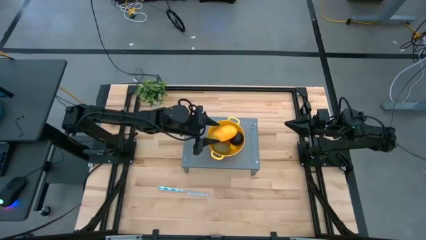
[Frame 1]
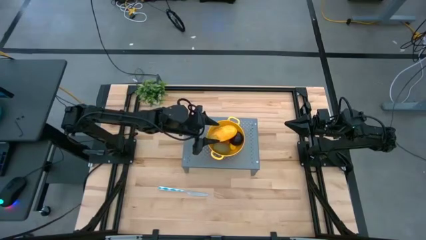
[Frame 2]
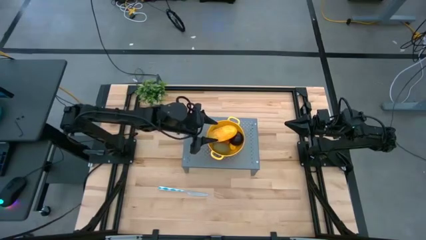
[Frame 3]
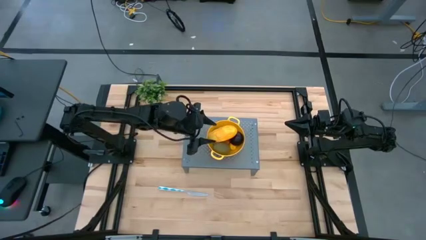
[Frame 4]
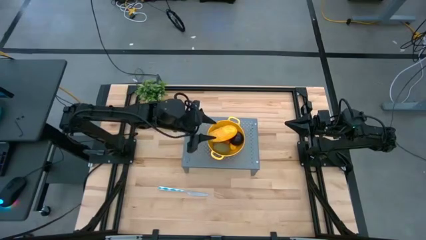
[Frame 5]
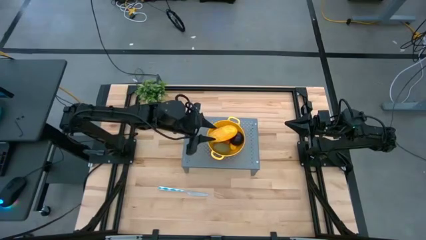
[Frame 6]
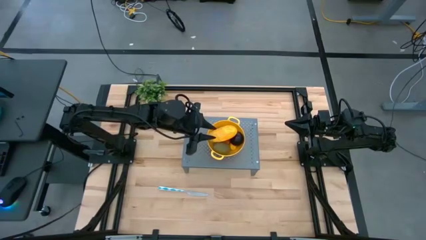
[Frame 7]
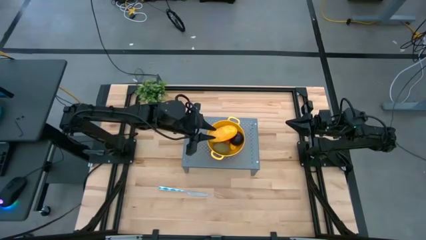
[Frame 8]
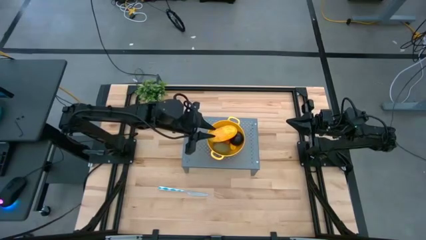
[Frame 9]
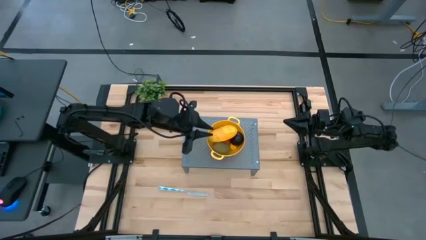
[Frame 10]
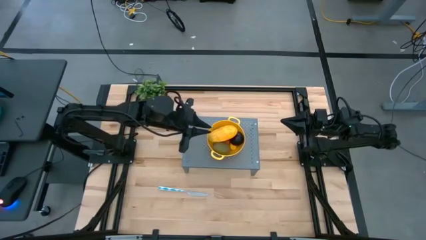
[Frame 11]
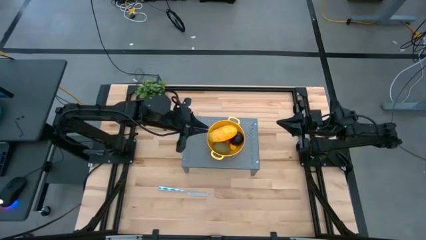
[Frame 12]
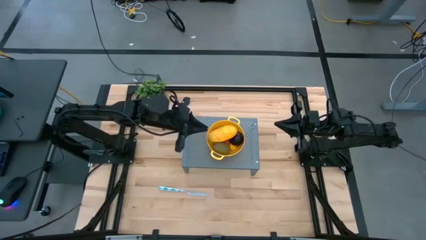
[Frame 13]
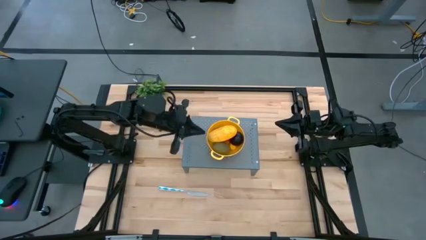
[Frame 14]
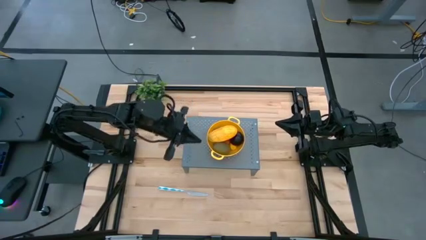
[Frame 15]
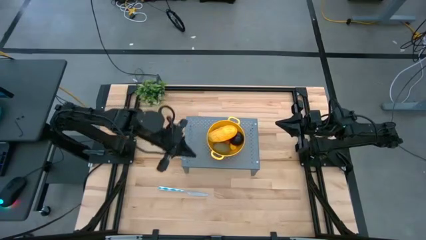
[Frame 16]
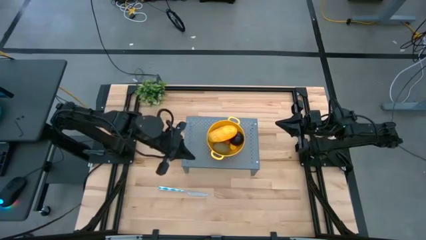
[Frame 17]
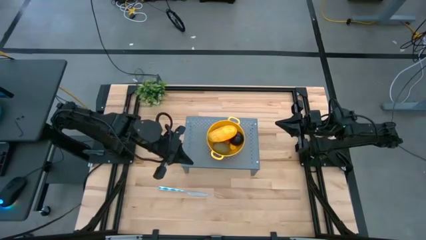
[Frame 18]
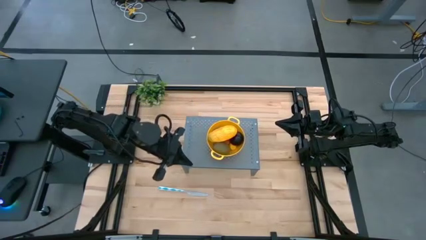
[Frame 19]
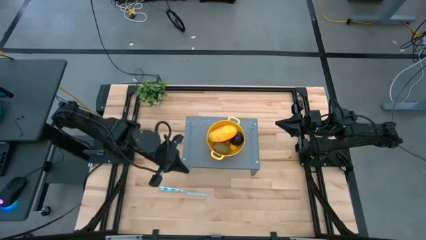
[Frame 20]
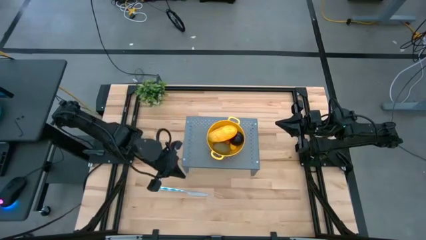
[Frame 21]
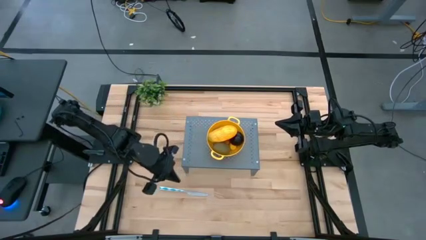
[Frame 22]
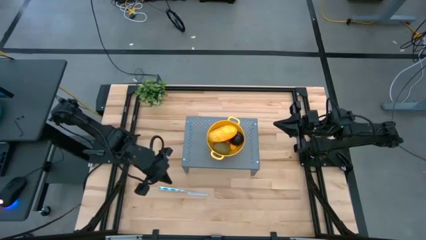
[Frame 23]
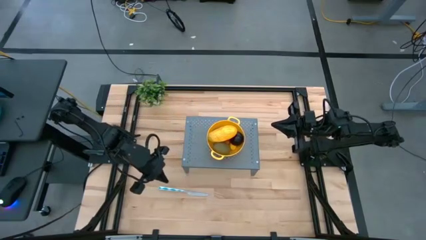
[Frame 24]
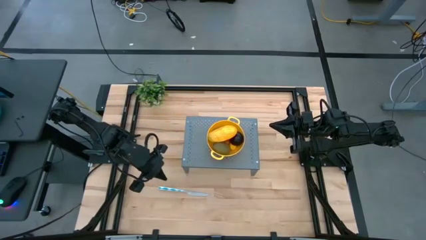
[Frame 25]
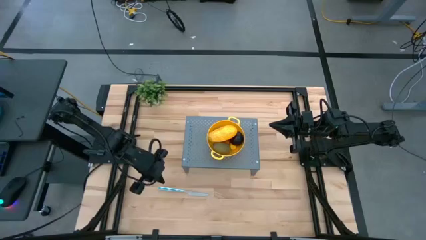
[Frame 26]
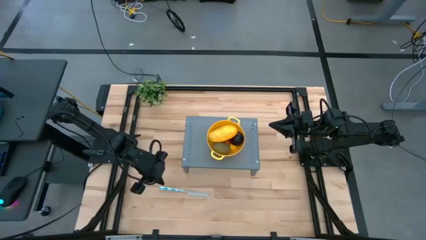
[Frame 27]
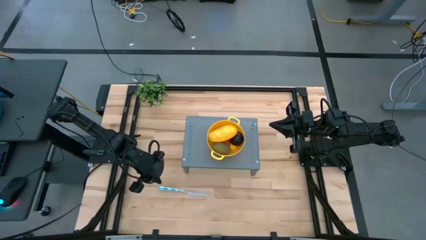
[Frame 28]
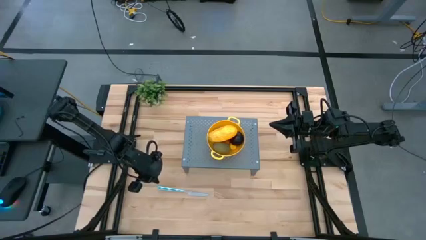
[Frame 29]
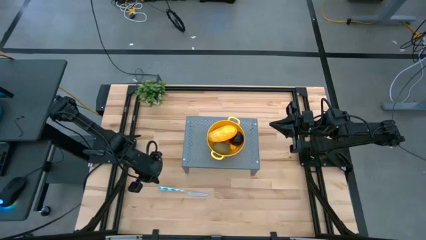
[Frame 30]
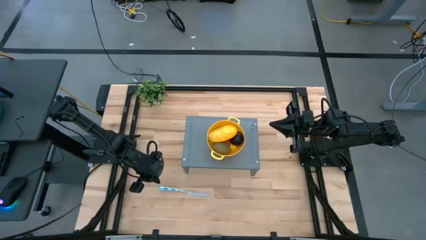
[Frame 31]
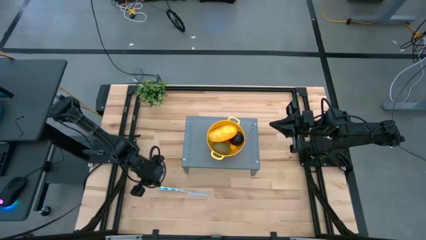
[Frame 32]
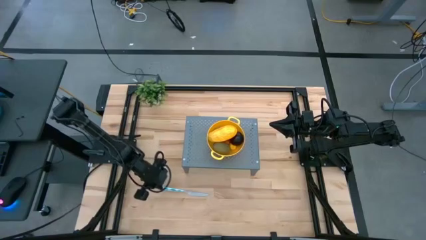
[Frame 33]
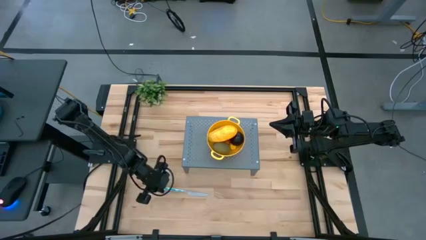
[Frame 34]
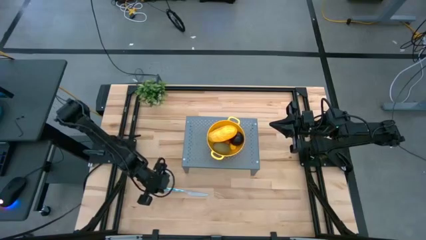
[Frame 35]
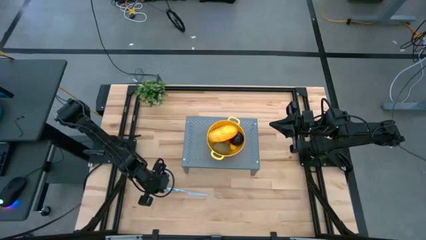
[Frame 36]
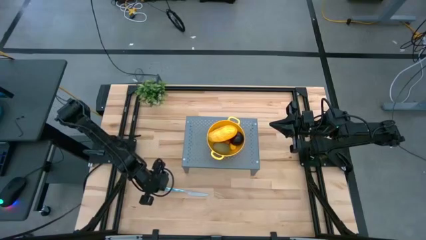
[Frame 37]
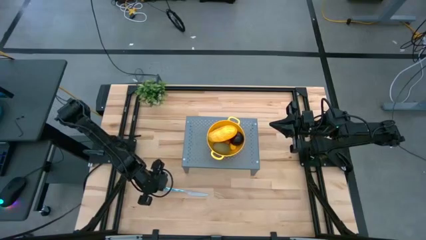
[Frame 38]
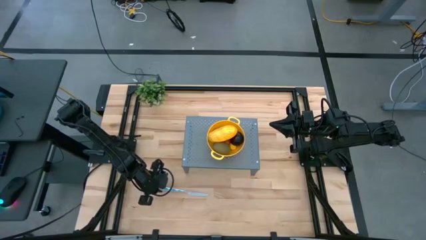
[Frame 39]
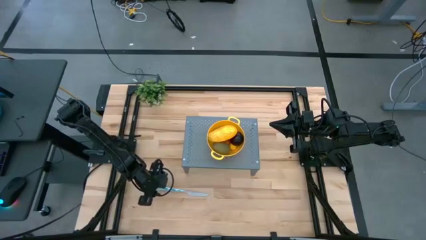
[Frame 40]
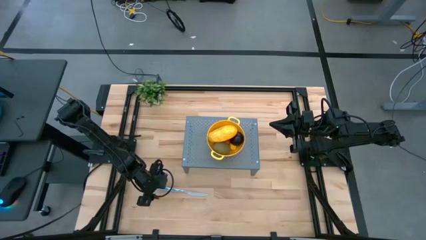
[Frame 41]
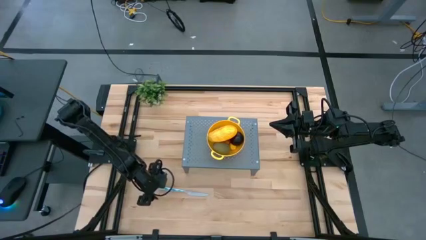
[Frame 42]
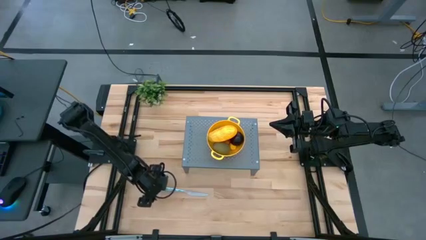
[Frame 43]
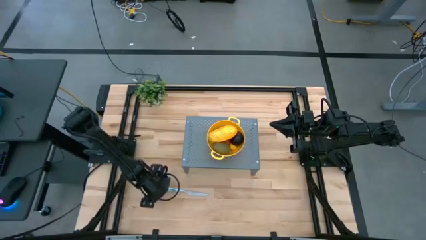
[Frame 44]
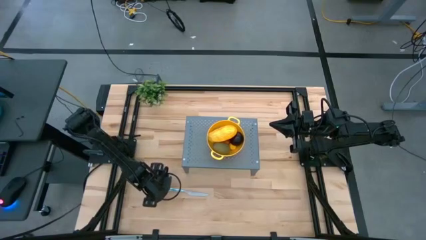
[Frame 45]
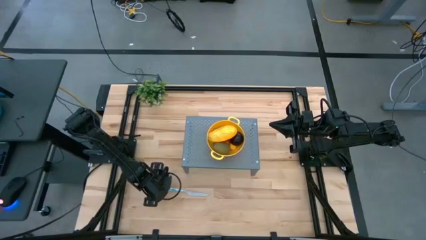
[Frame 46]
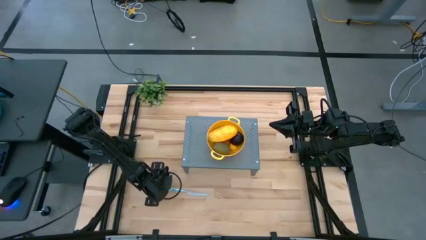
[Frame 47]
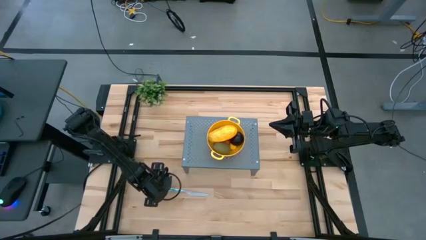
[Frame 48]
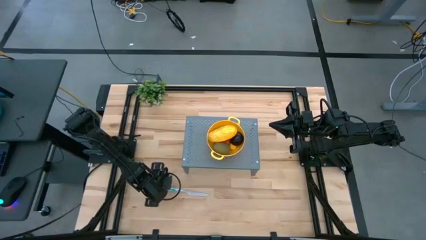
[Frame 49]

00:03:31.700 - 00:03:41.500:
Task: Pick & Place Fruit
Put the knife on the shelf to the left of the strainer bowl

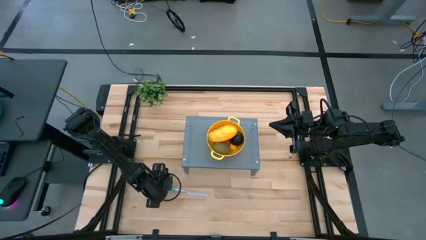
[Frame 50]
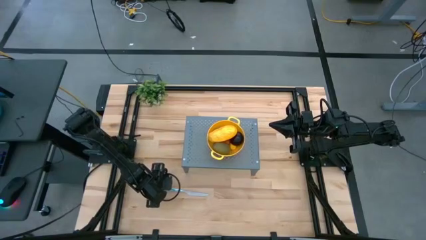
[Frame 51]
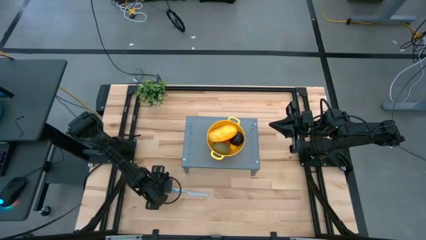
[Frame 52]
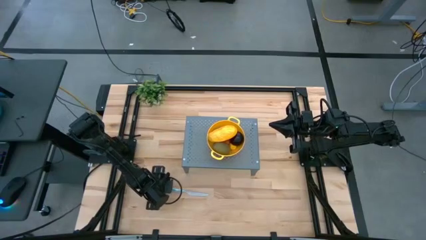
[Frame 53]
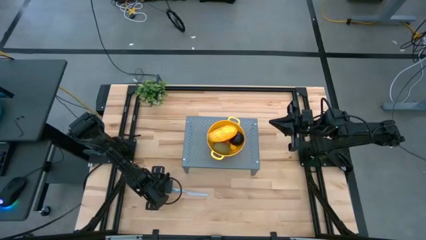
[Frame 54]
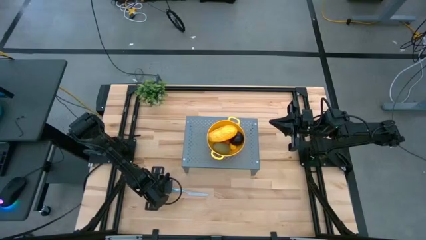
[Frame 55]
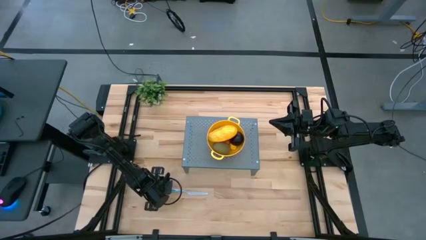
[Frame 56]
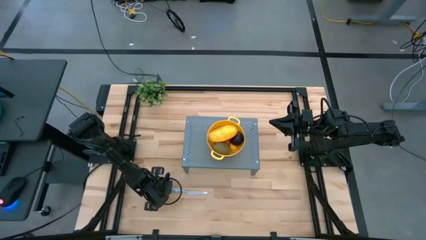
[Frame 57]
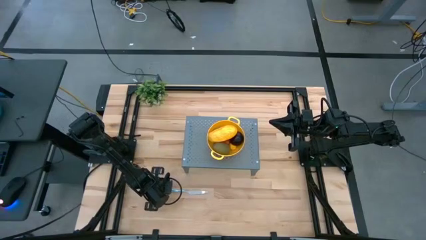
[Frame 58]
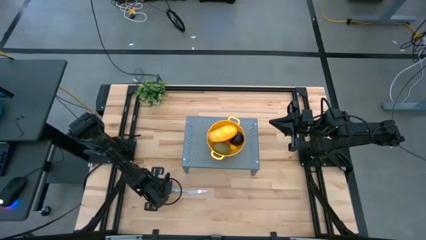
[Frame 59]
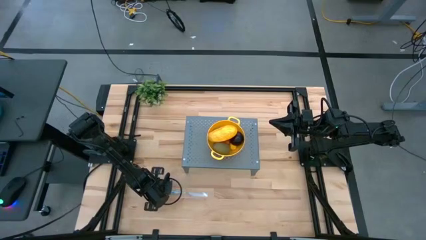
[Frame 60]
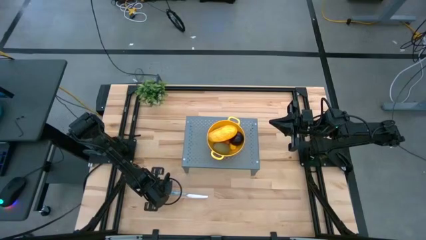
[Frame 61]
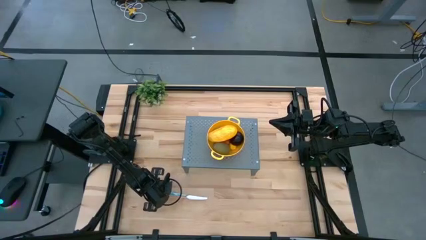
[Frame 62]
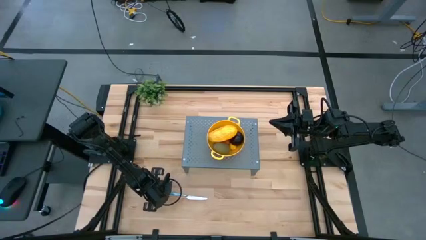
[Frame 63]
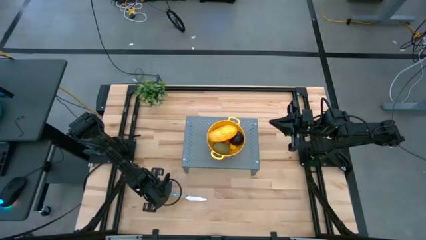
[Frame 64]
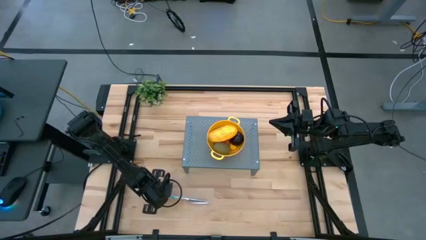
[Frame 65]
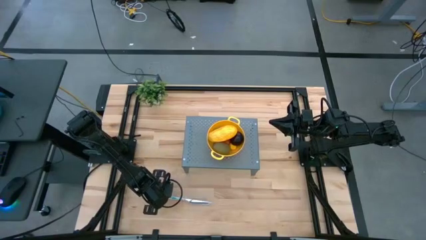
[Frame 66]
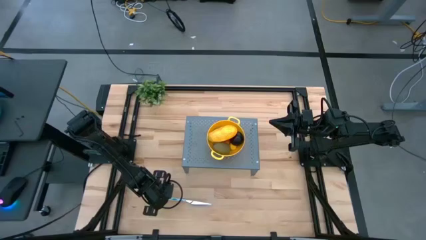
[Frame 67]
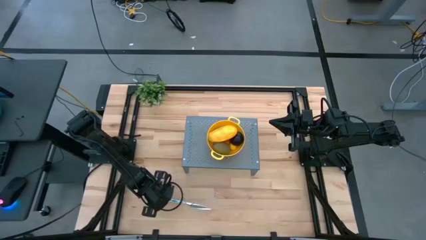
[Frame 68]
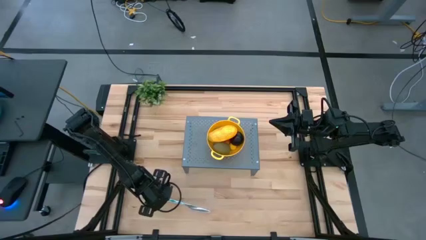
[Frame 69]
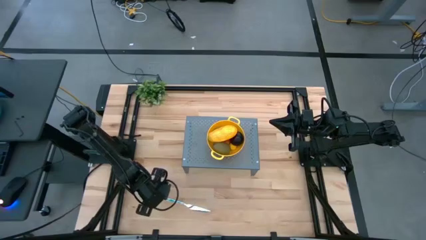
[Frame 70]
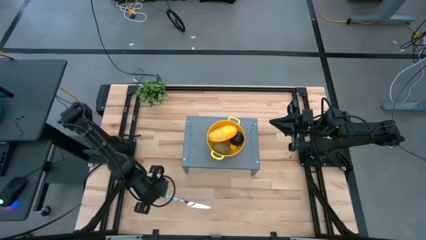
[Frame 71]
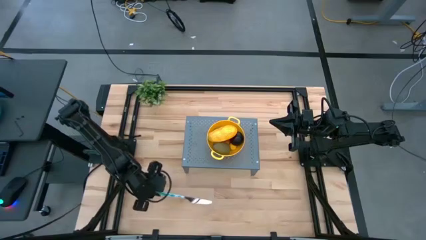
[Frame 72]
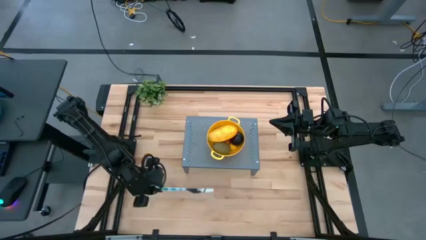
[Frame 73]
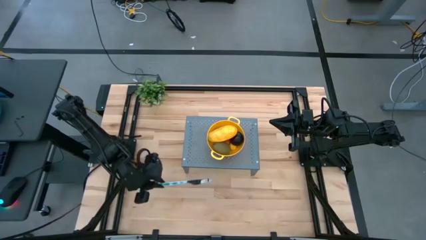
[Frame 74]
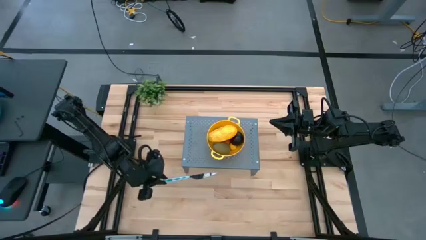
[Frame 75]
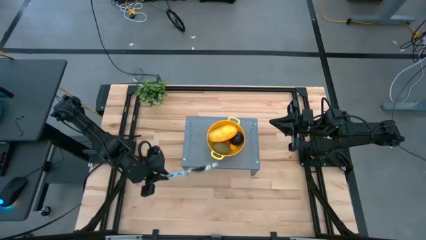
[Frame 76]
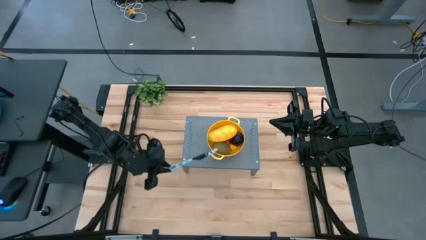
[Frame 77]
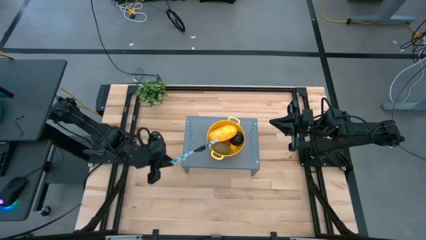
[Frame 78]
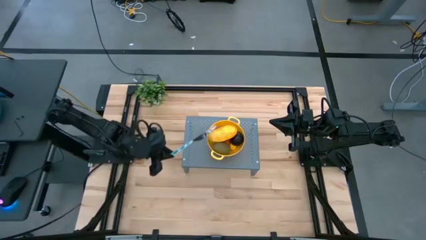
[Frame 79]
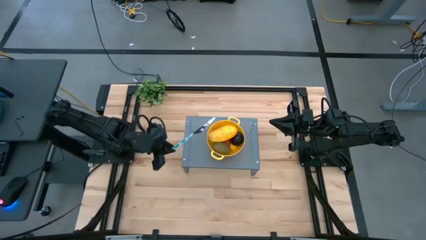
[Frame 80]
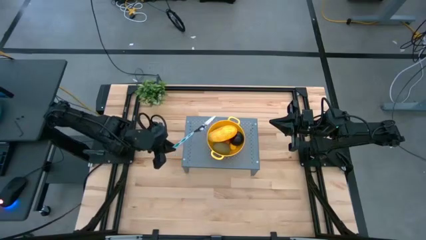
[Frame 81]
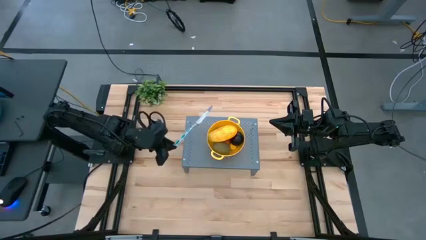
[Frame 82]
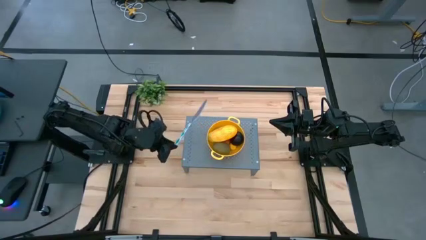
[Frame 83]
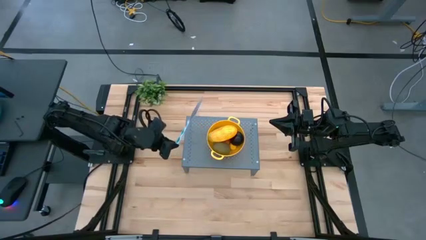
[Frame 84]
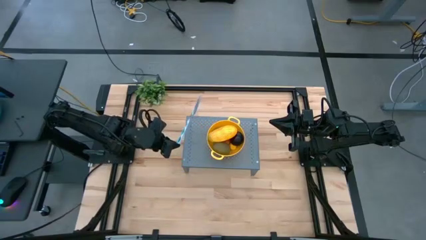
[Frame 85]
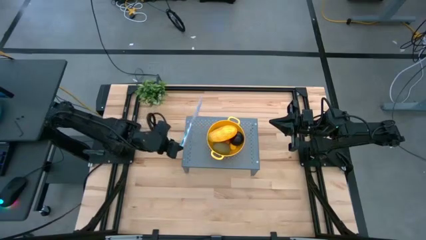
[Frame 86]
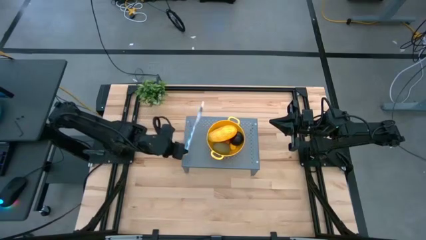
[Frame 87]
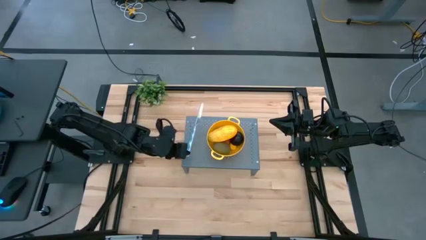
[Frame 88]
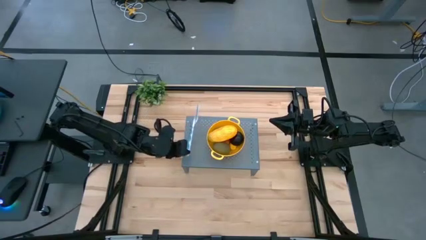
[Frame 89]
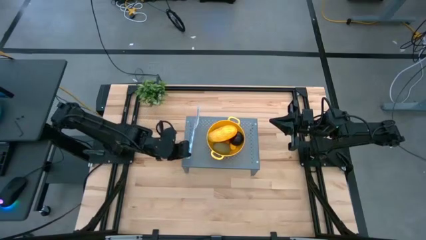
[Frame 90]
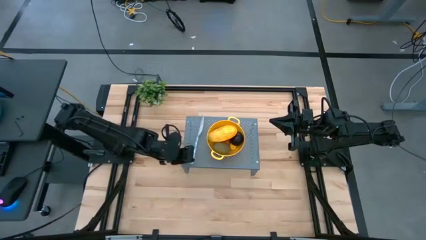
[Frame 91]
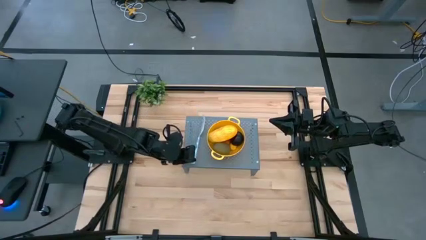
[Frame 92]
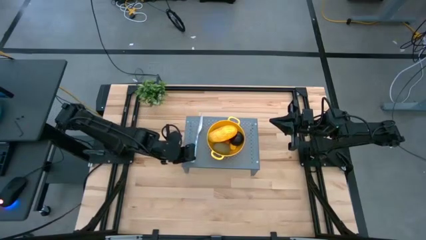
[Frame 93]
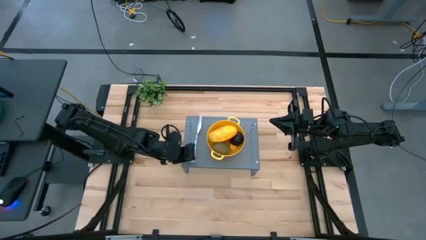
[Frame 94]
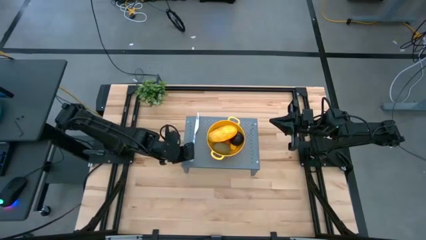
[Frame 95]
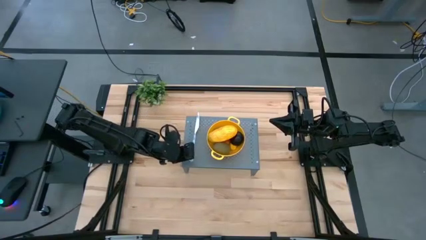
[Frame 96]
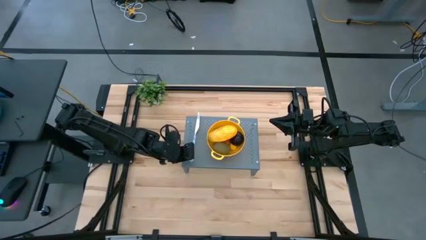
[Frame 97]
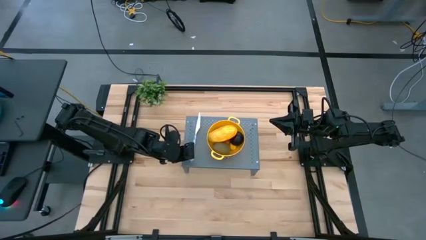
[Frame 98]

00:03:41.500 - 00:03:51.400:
Put the knife on the shelf to the left of the strainer bowl
